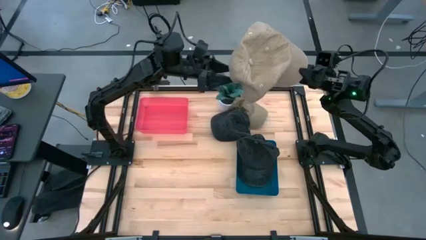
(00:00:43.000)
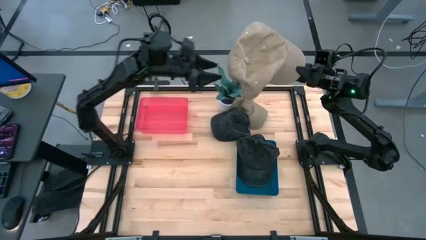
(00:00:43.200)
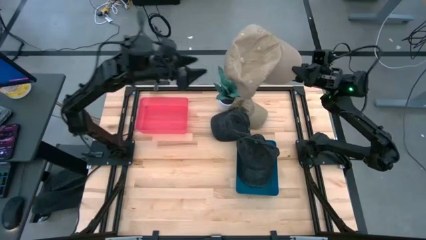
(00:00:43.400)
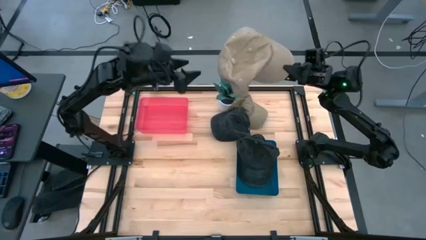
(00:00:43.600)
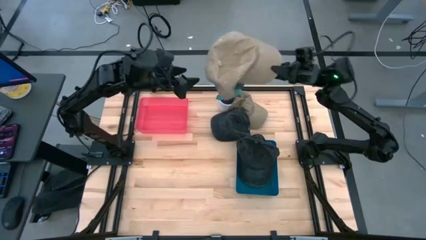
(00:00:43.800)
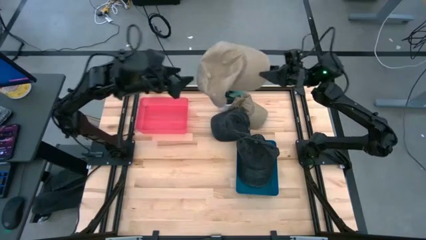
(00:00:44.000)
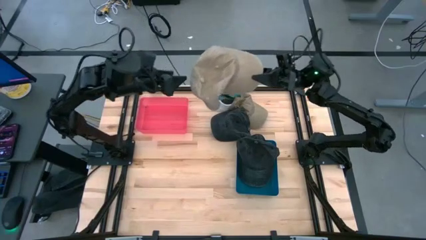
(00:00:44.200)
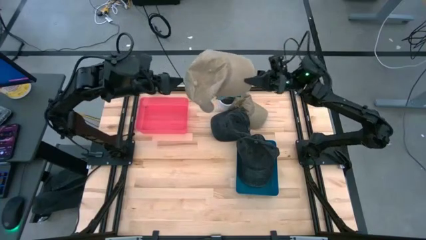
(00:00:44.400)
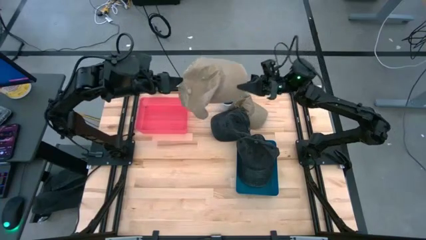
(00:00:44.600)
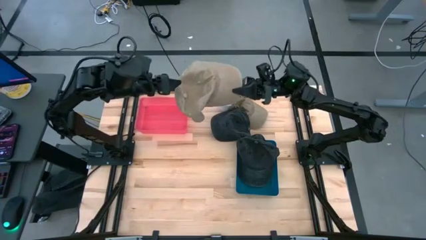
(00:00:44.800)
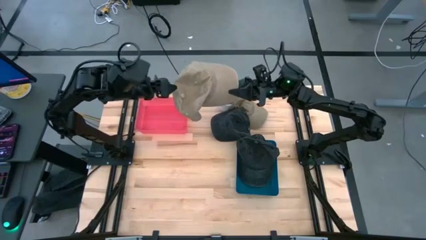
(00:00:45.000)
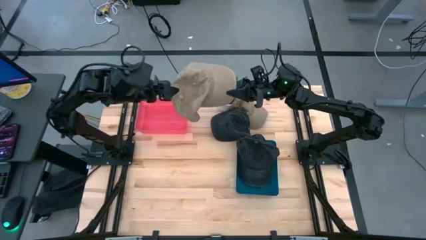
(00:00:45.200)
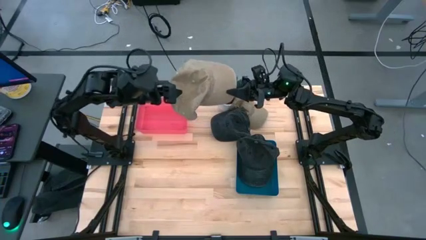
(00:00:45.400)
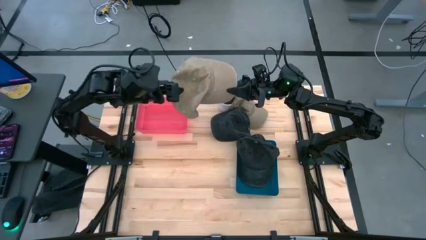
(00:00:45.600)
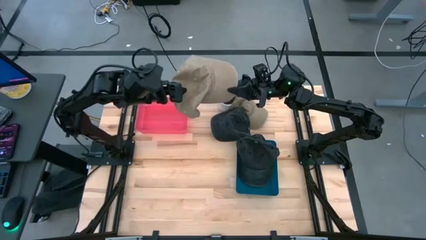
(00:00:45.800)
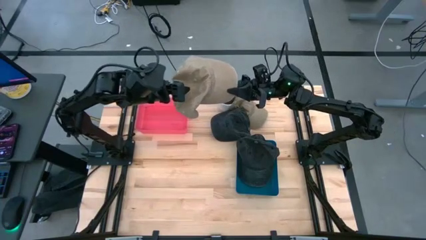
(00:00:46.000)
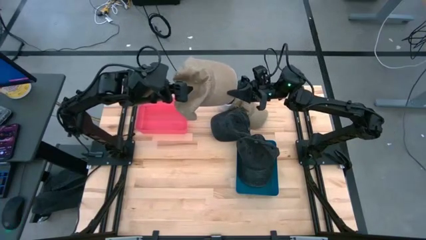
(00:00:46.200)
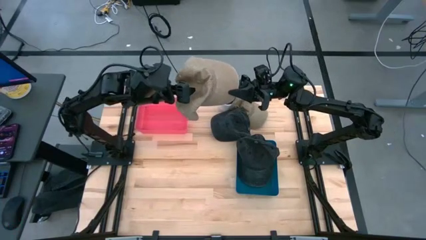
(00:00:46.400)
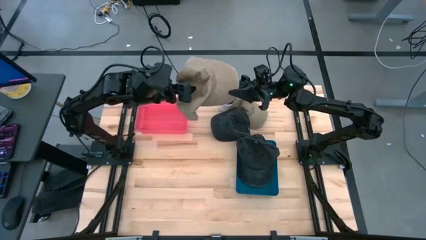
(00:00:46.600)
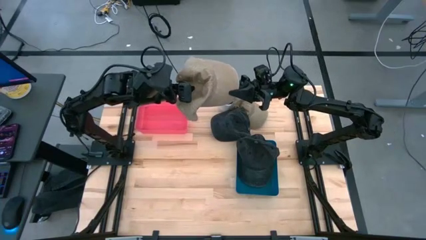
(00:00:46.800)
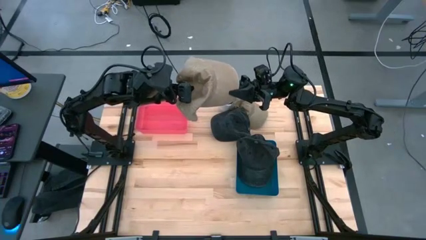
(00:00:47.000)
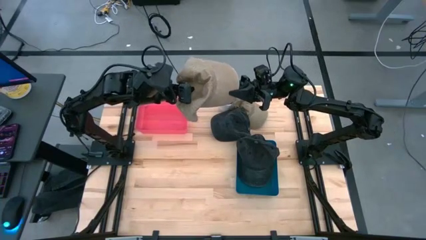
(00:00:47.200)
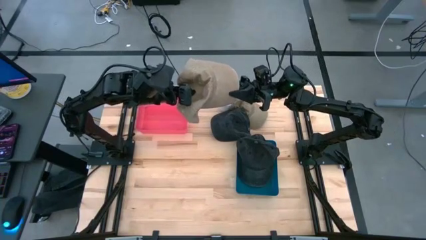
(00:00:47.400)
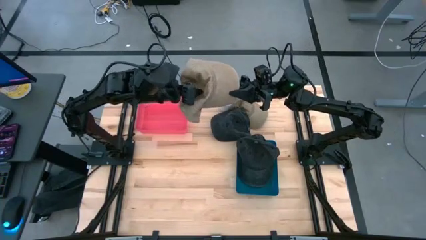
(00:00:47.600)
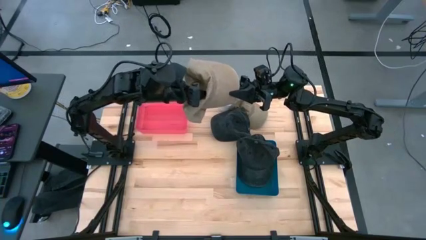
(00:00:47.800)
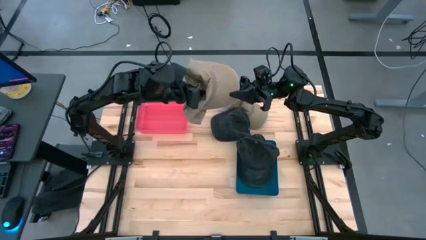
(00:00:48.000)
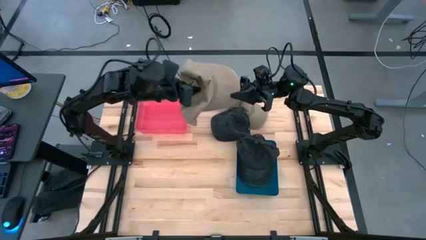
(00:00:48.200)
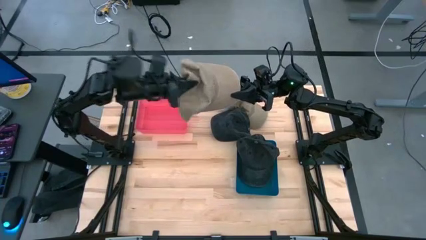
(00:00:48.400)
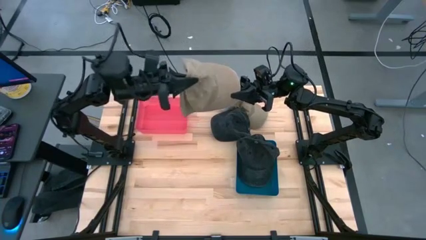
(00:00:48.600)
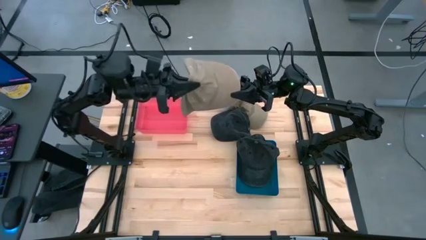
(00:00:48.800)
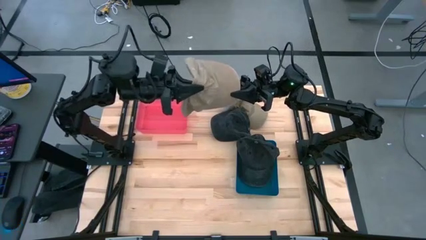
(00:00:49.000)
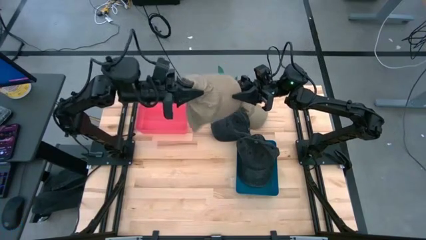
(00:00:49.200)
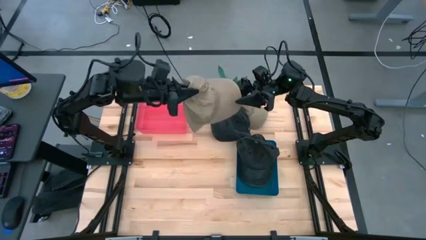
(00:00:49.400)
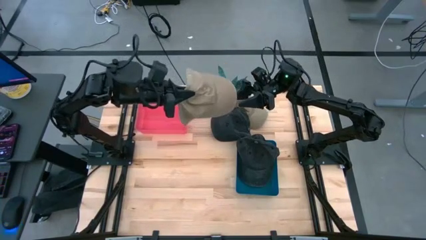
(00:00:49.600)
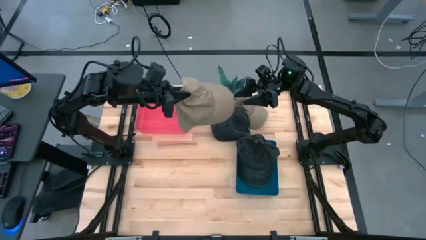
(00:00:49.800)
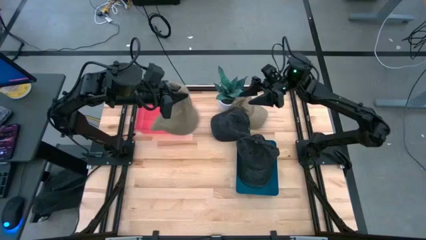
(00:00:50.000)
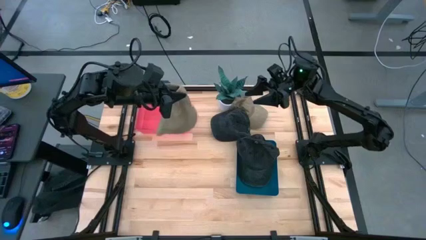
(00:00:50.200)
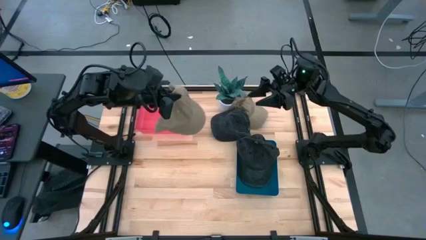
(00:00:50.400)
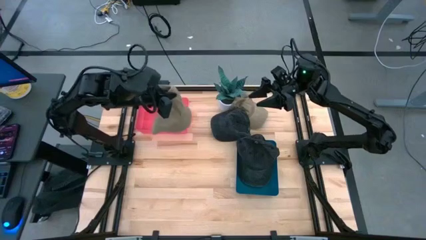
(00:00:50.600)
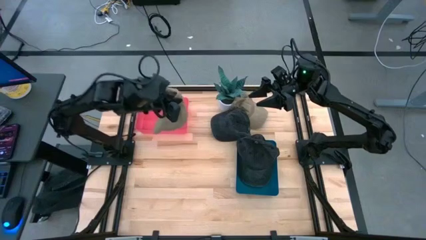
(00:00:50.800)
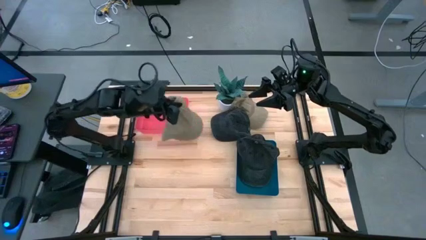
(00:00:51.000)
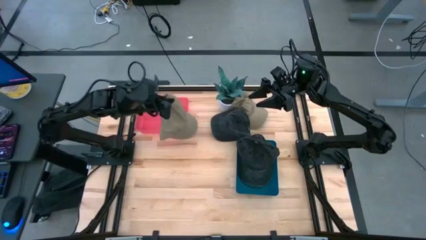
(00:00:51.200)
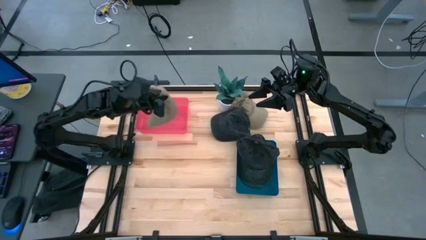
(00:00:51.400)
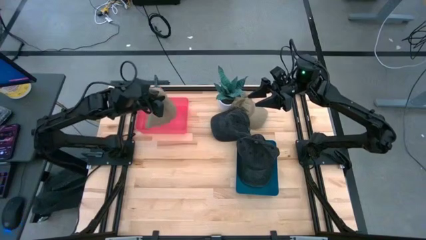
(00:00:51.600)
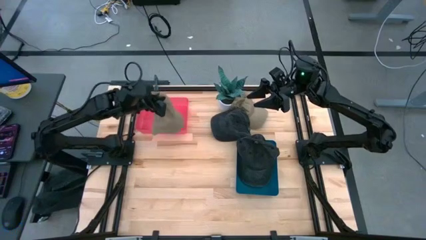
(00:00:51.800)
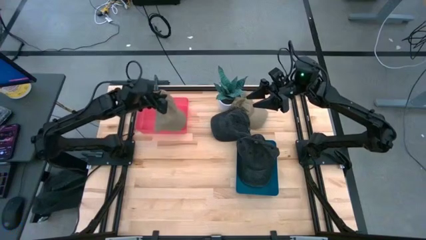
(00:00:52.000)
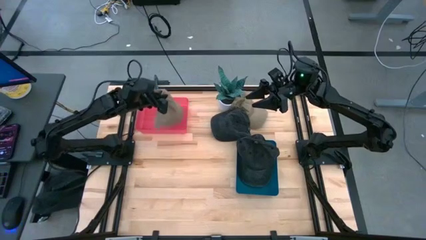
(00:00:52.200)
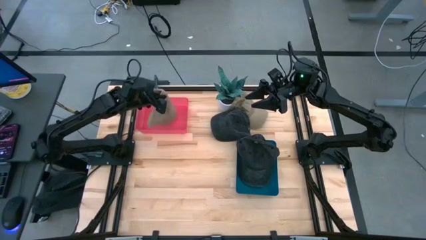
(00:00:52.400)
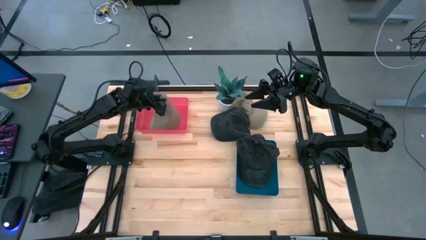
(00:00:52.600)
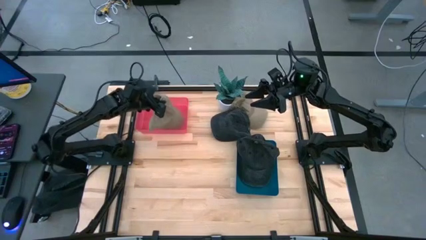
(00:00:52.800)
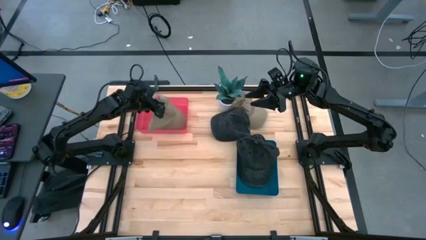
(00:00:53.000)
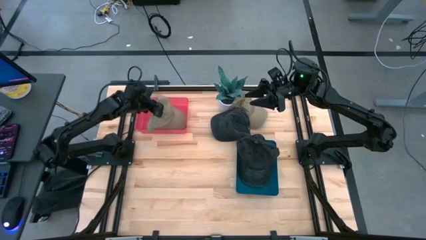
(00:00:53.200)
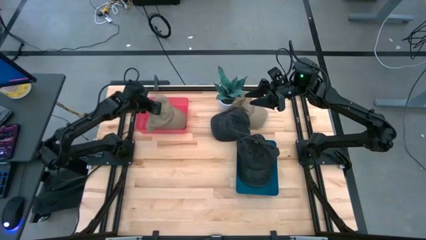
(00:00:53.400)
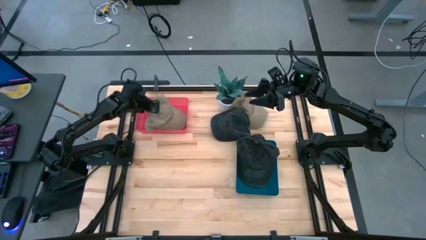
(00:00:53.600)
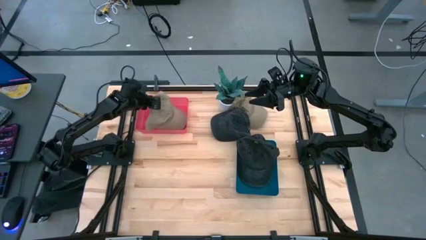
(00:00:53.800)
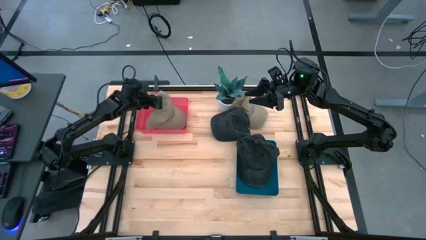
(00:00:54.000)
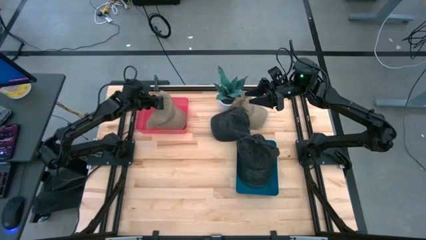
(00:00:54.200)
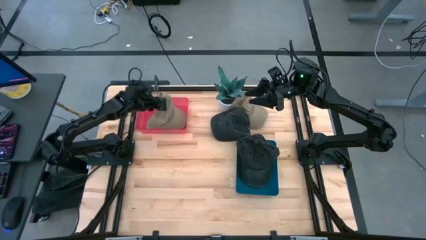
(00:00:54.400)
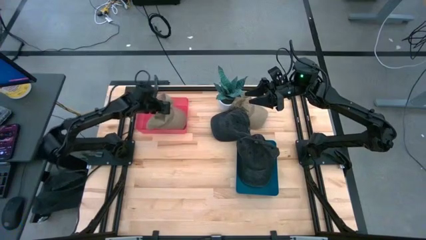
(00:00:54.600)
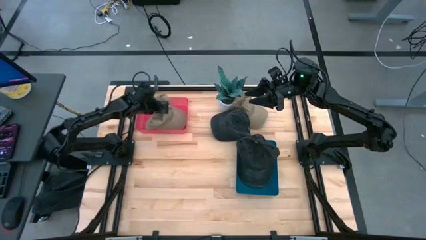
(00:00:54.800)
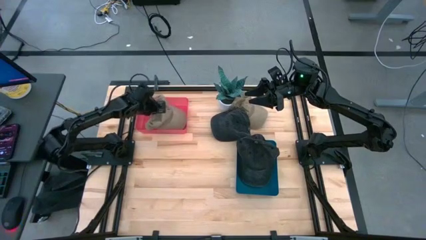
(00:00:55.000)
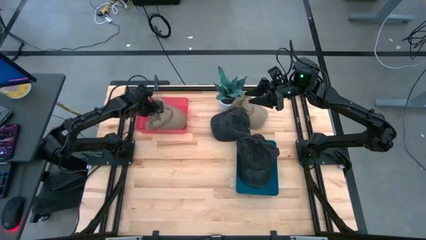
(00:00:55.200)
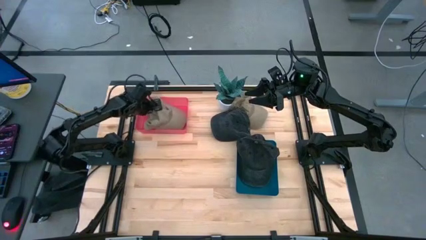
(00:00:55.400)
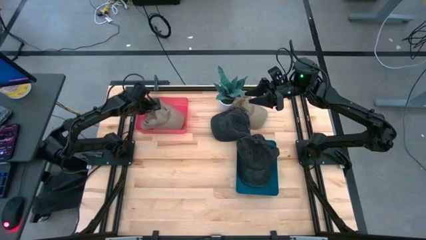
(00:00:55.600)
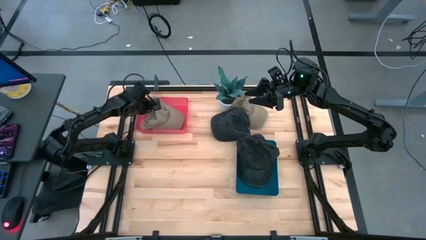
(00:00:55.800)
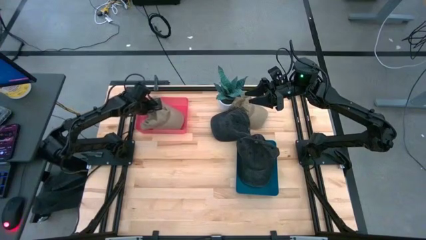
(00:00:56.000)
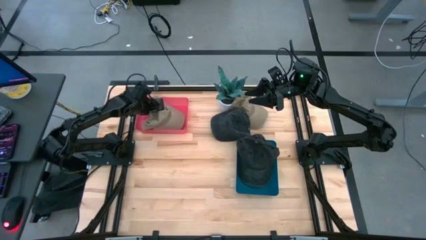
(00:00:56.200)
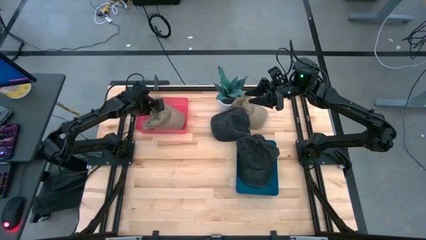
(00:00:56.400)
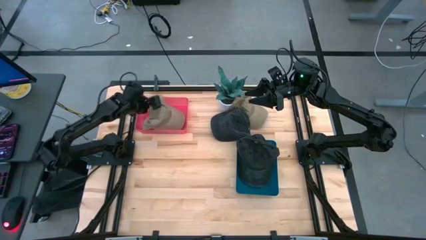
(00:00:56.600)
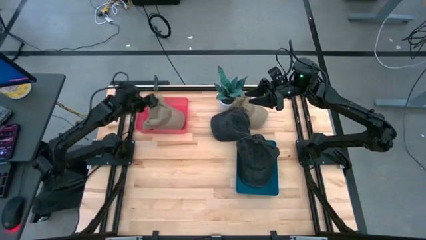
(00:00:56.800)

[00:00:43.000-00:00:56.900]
Task: Pick & Place hat
Put the bottom brown cap into the pink bin
